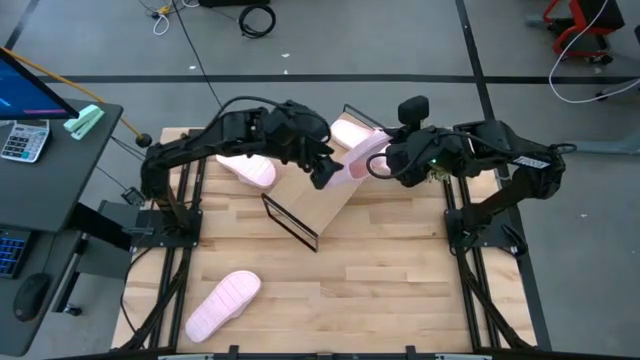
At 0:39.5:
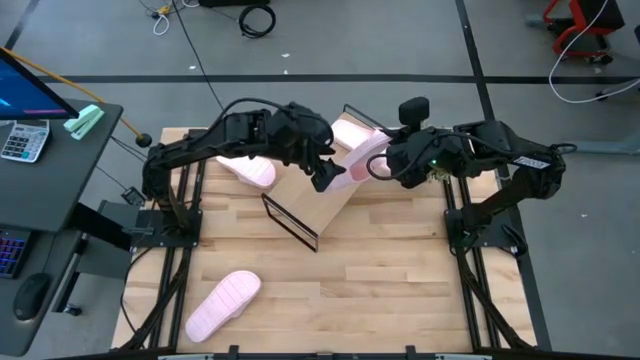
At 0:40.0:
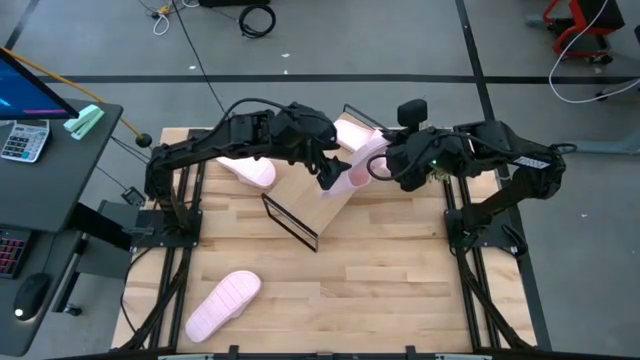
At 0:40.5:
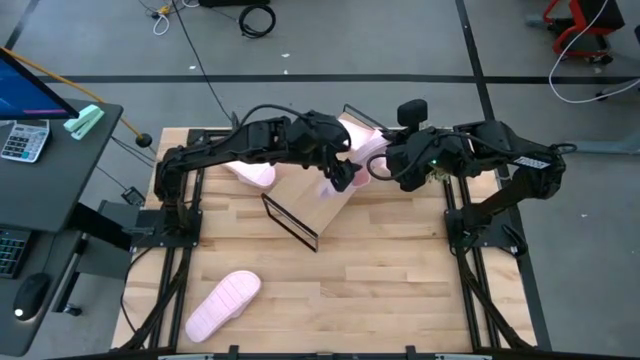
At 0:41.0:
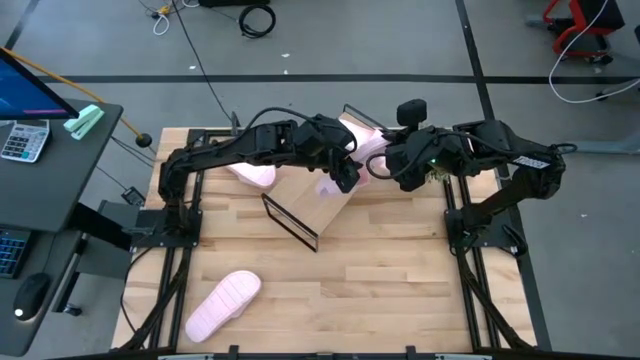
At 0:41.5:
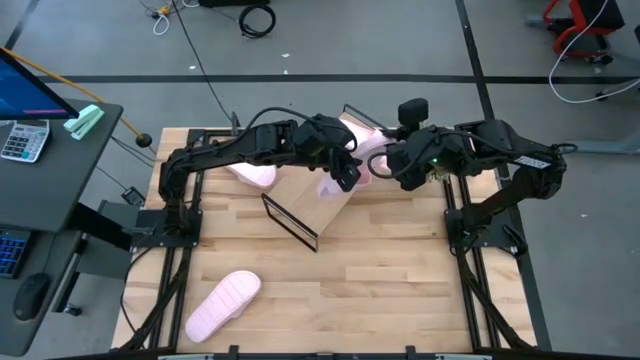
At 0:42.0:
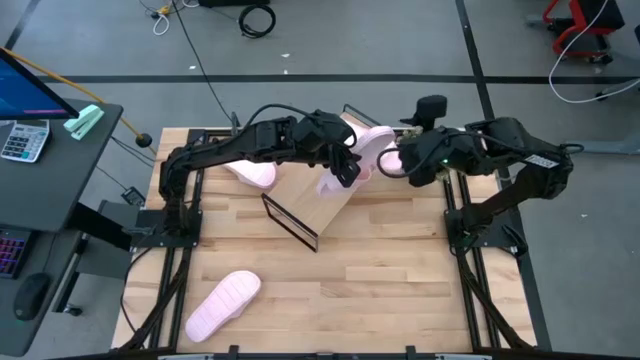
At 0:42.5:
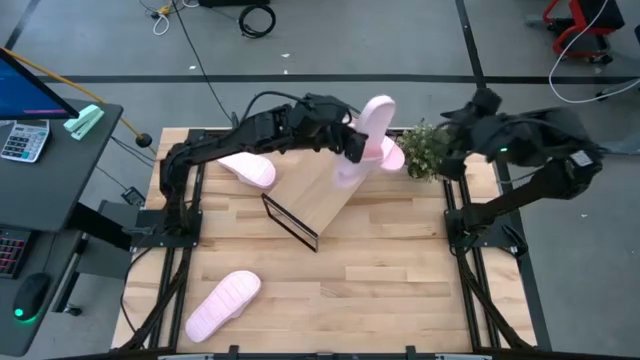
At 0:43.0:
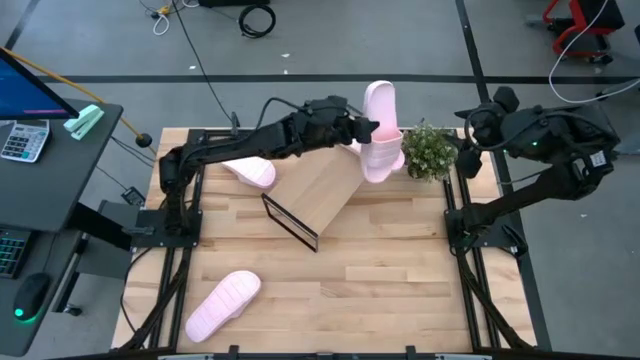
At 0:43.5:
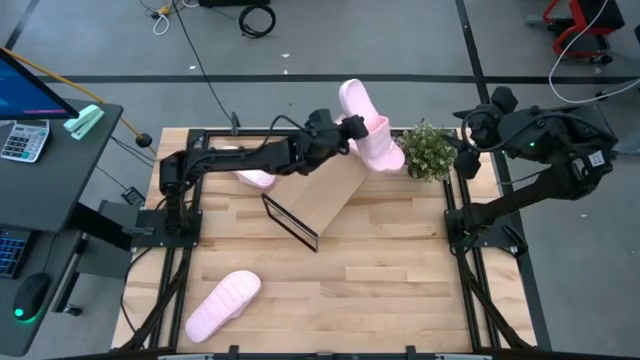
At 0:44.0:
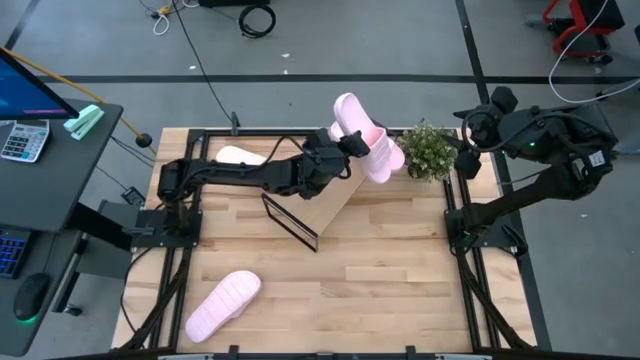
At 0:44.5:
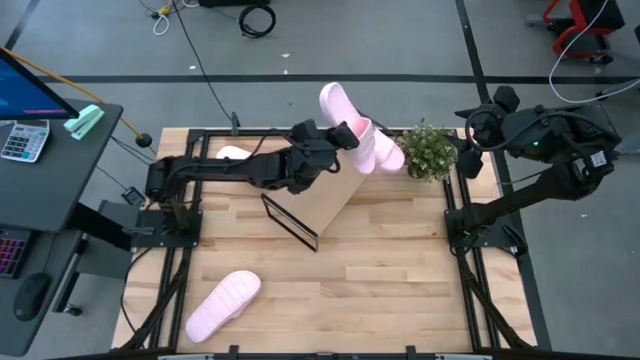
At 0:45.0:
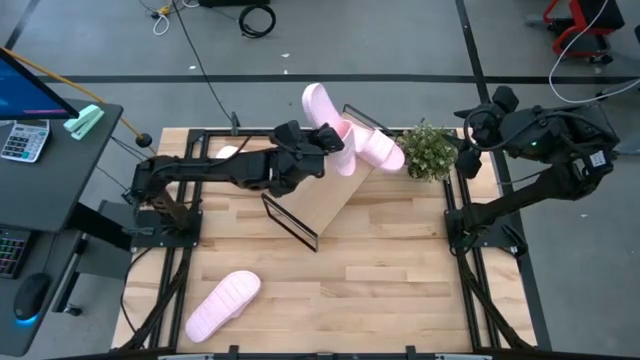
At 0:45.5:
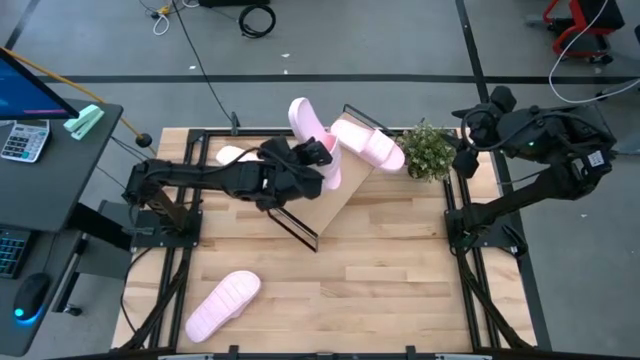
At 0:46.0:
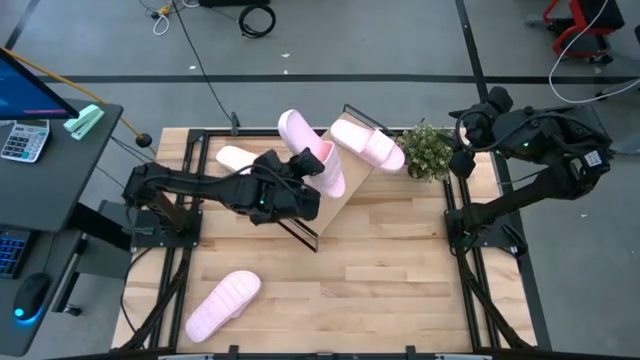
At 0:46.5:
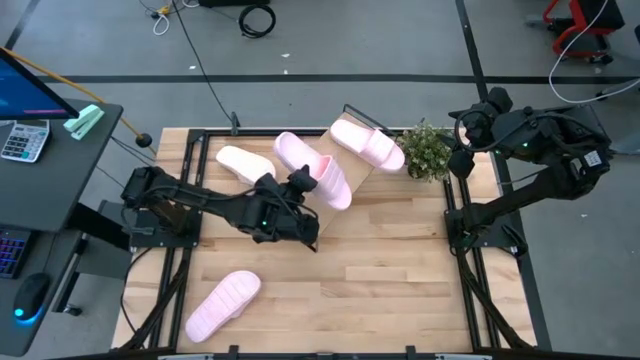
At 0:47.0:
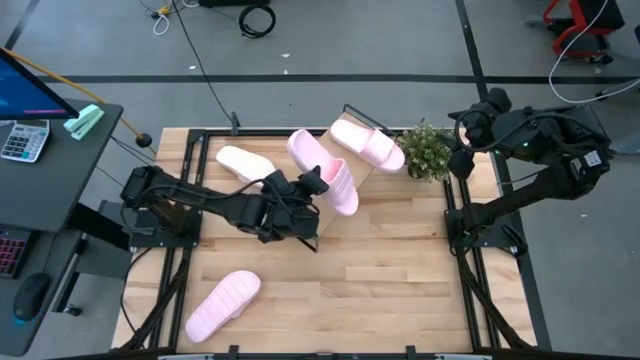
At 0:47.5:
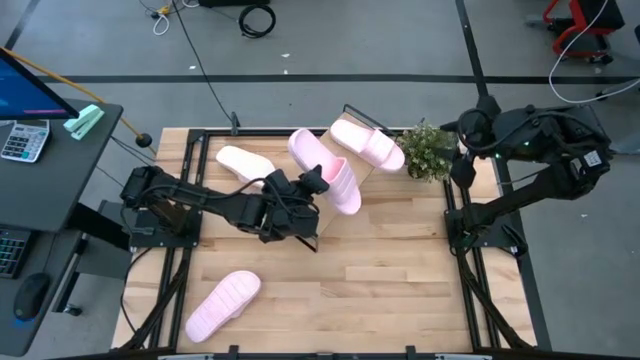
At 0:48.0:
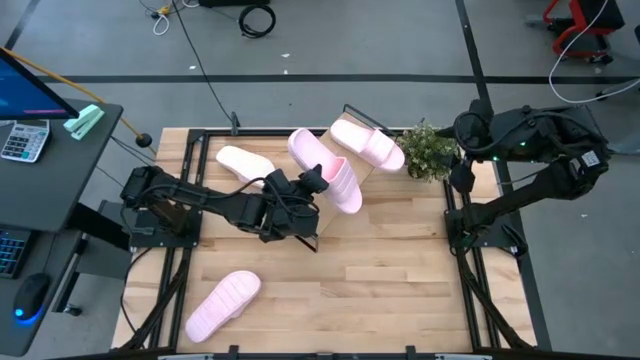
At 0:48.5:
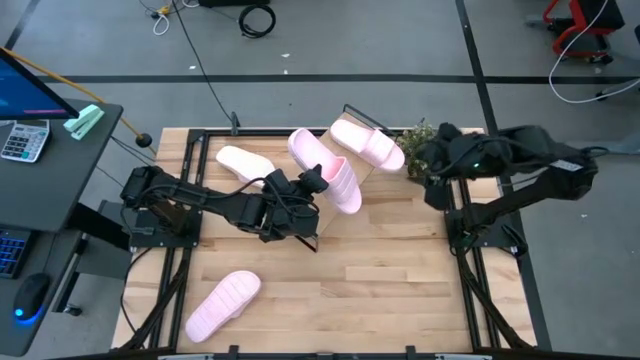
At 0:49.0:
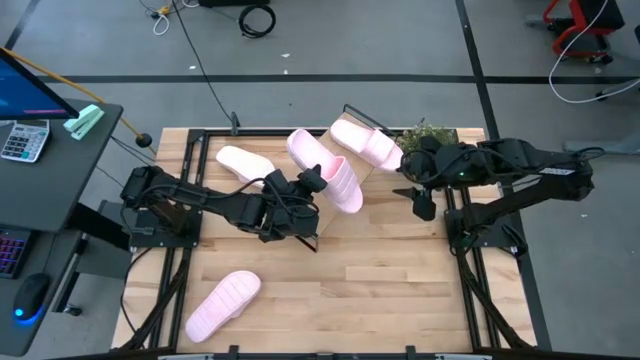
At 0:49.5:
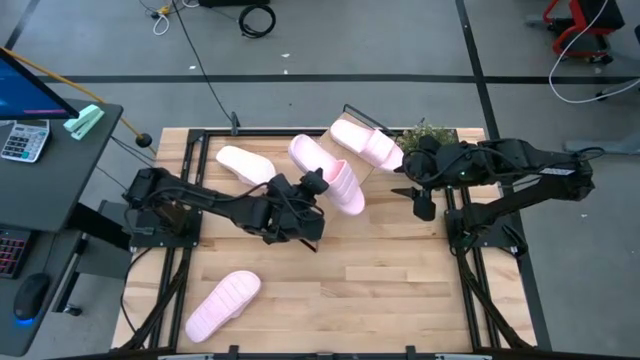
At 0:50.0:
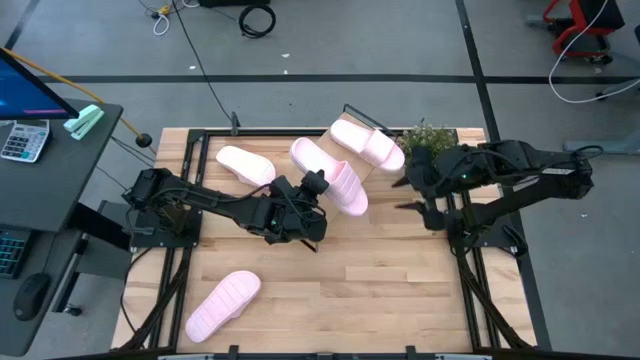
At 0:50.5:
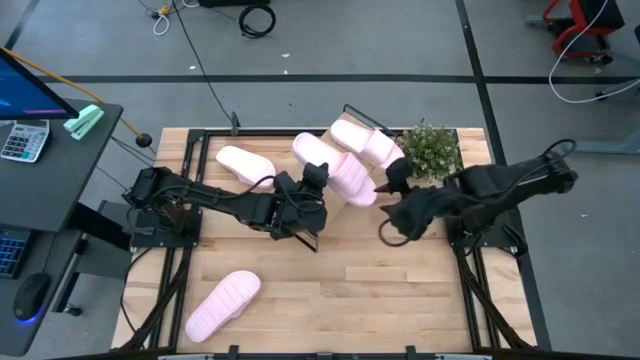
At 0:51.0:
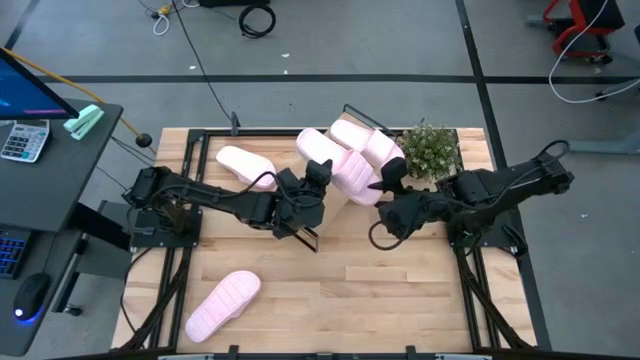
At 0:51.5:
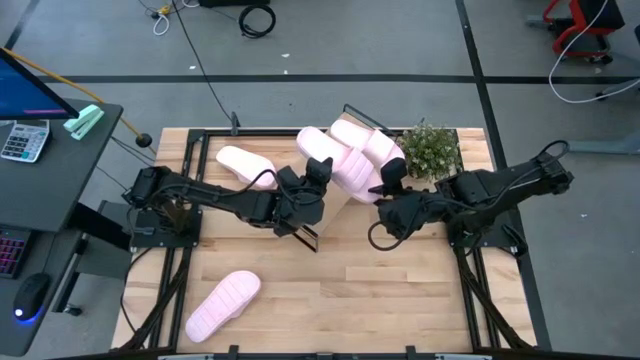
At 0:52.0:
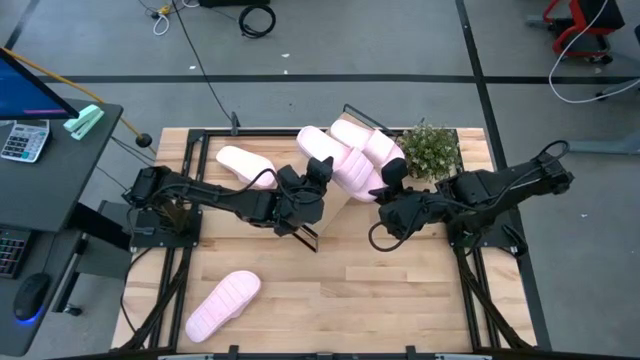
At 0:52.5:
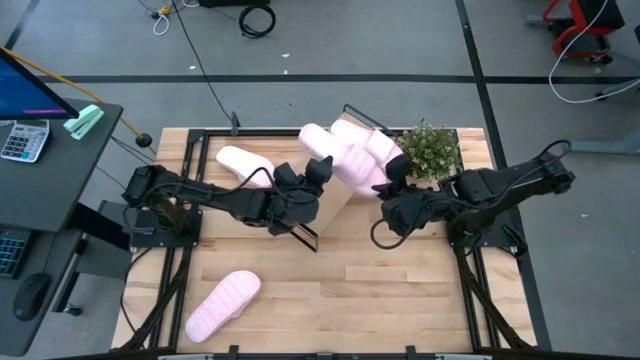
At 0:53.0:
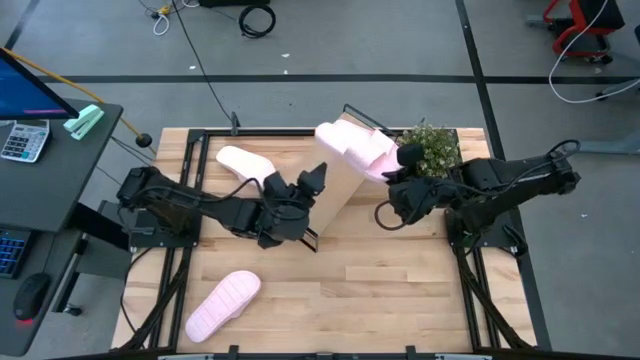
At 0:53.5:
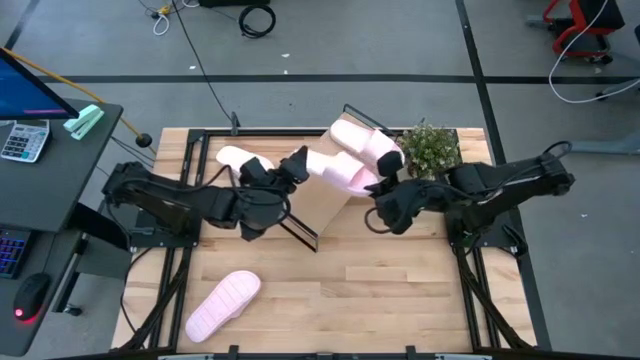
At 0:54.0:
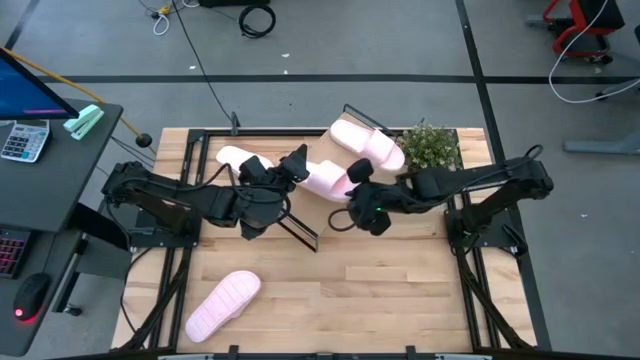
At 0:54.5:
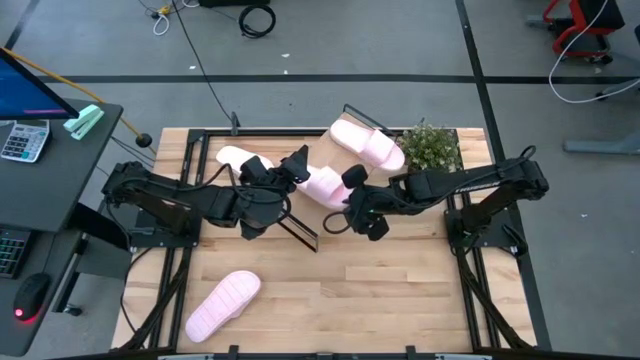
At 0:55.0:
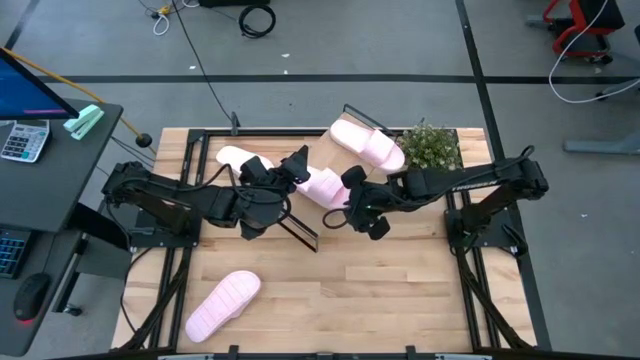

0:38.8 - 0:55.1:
Task: Pick and place slides into the shelf
Put the top right pink slide on the shelf
